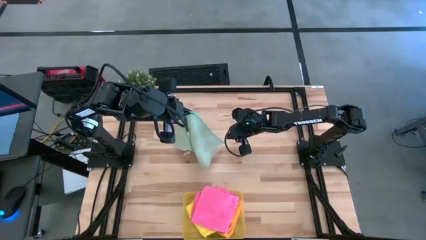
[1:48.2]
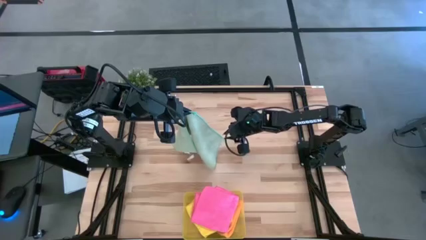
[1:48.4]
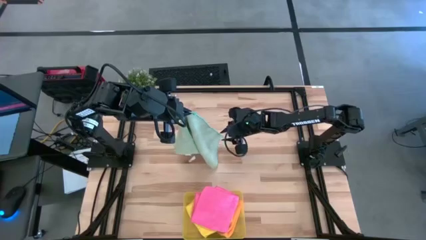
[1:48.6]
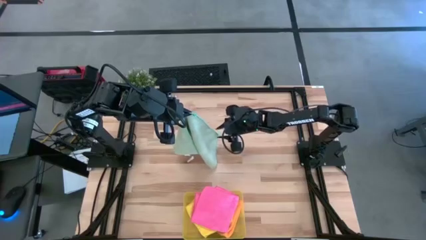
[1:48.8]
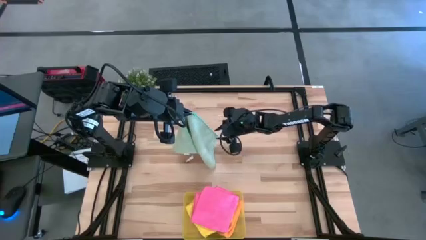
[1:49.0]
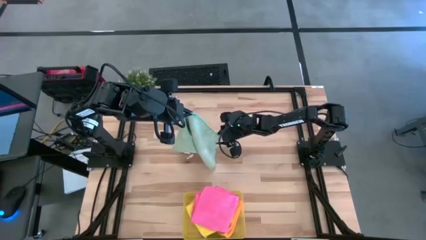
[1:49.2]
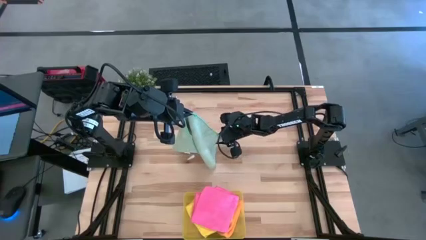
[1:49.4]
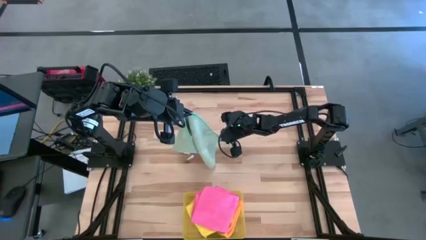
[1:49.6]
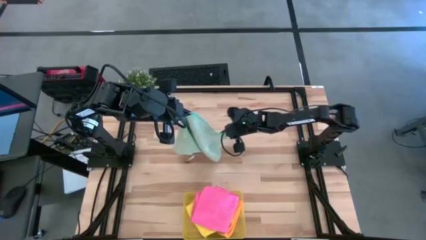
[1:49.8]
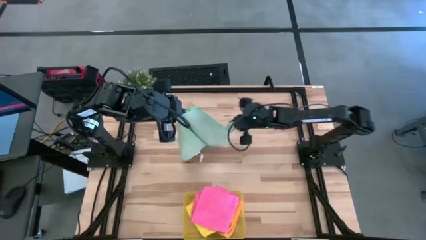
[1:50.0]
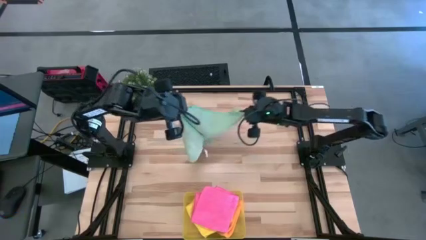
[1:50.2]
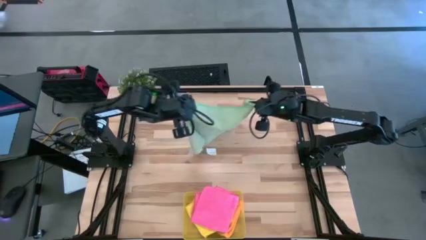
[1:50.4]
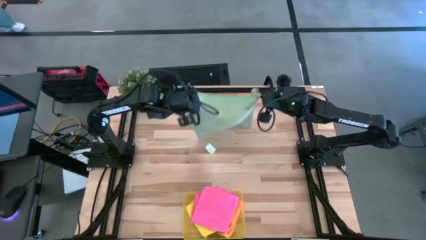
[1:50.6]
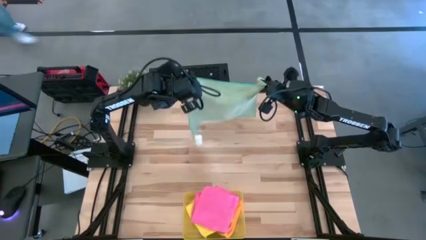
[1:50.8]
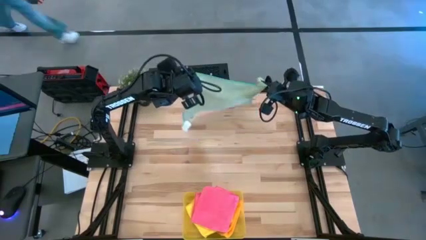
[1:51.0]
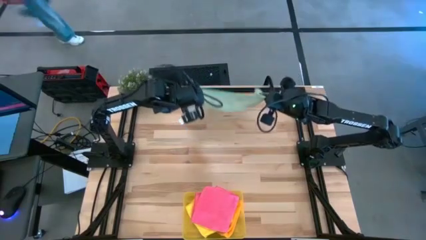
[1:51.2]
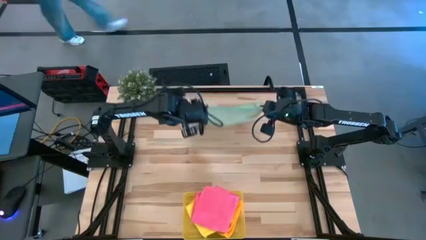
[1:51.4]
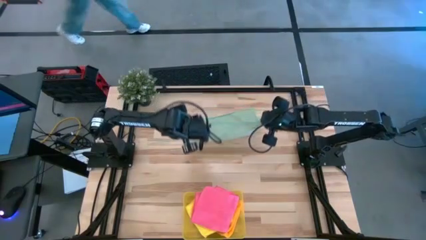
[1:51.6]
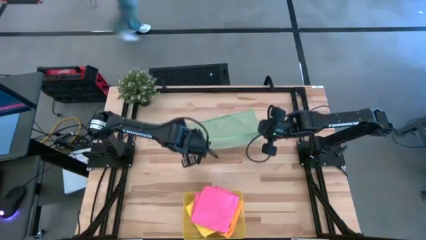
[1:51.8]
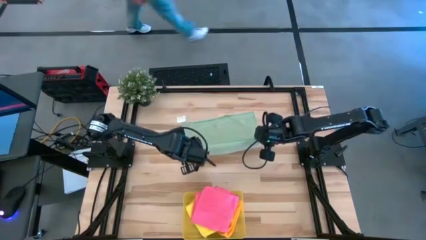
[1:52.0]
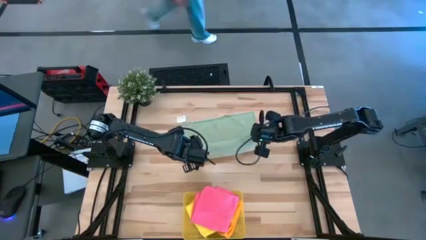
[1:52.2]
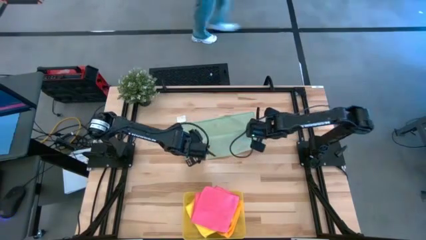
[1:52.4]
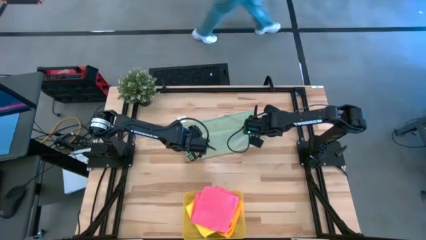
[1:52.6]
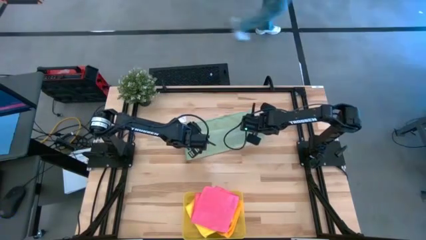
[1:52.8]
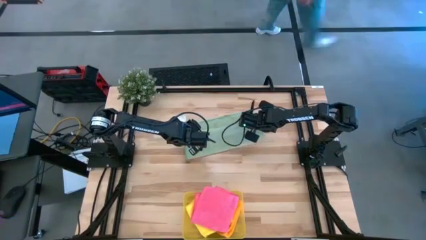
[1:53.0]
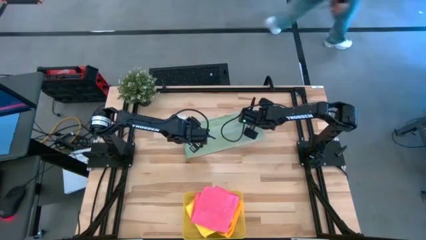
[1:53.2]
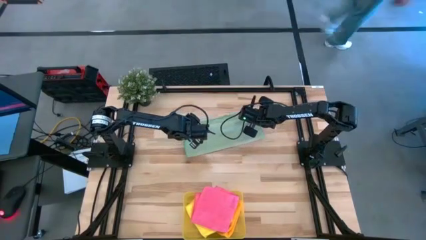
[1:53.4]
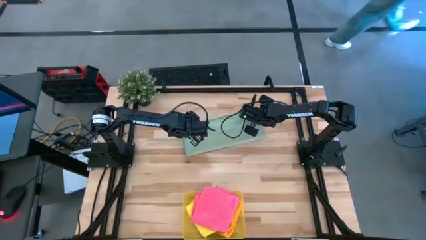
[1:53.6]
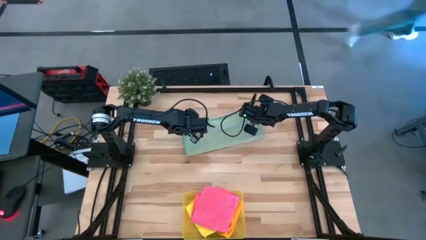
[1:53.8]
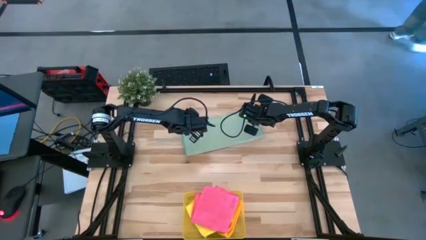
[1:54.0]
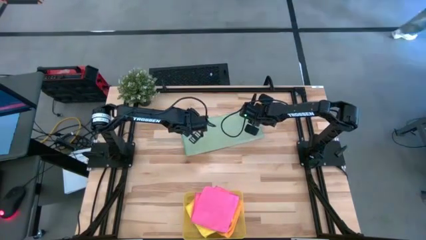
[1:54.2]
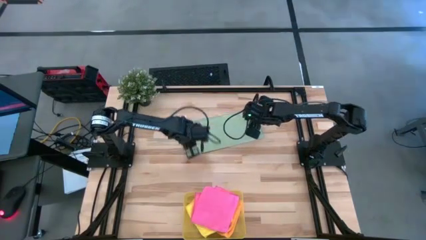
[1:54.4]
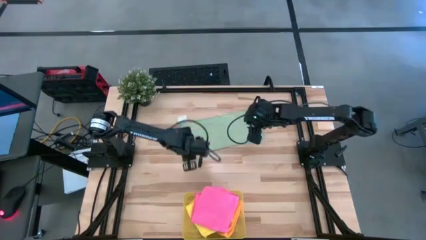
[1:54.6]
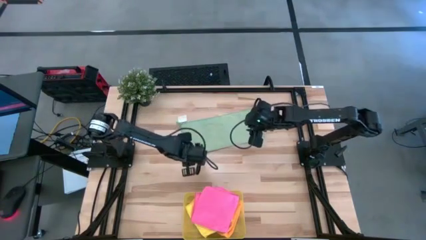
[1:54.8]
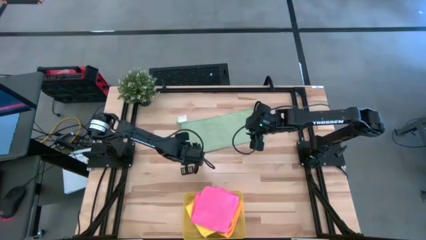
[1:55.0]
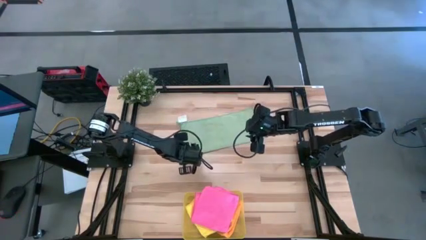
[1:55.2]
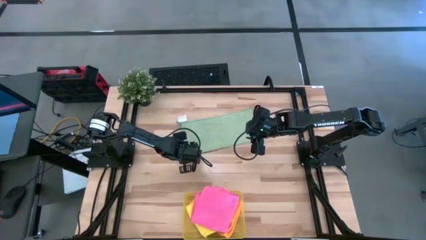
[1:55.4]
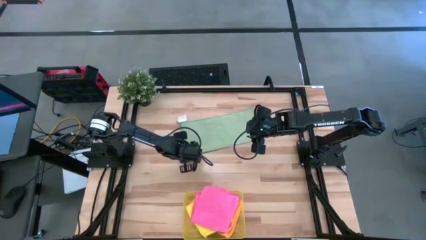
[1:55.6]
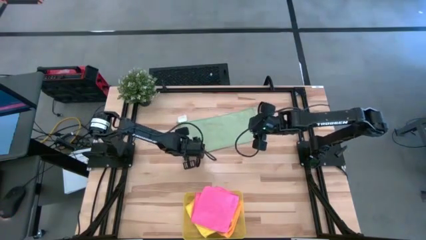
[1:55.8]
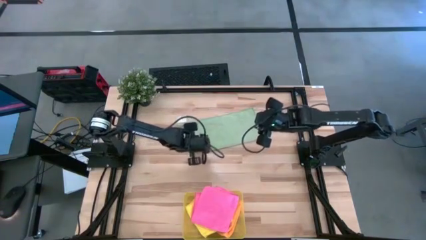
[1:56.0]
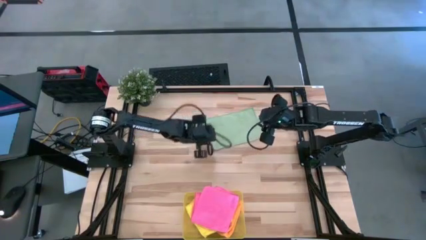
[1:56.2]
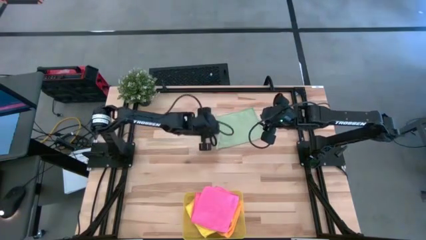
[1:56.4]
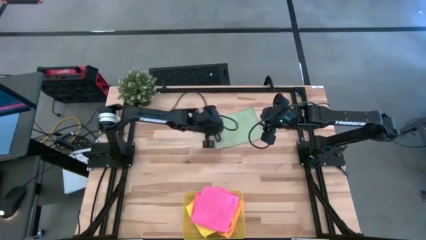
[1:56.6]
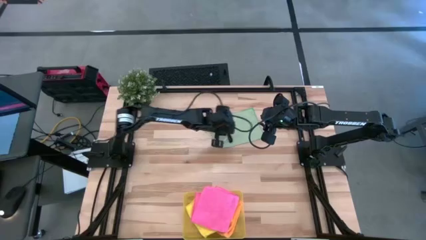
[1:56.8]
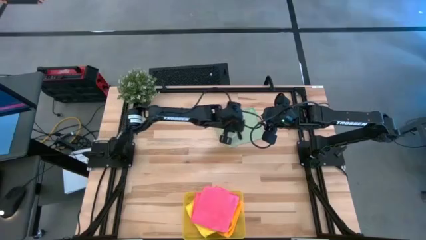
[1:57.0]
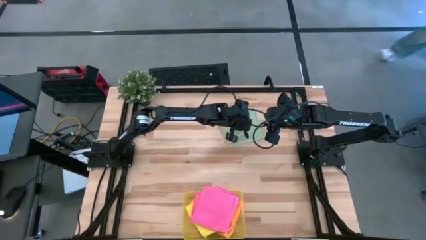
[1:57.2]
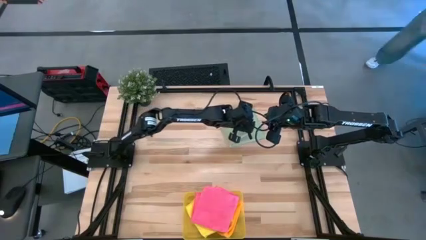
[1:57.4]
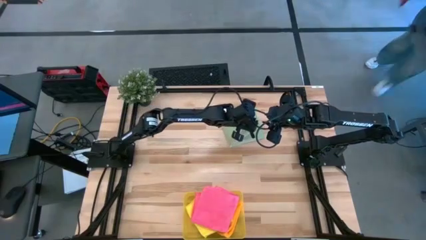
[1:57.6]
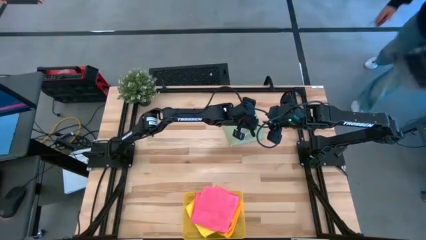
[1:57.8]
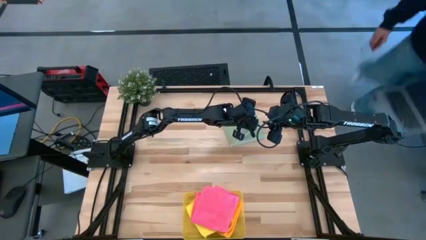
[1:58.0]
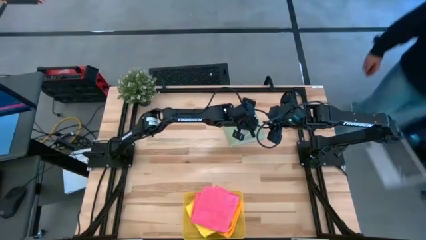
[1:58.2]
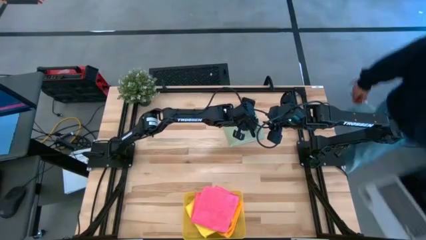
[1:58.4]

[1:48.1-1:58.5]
Task: Fold microfiber towels
Fold the green microfiber cloth

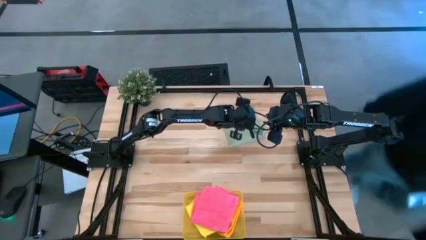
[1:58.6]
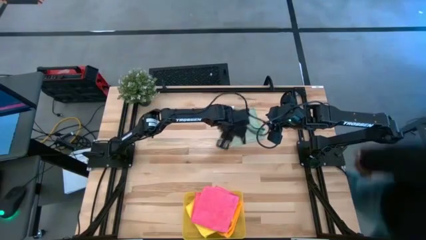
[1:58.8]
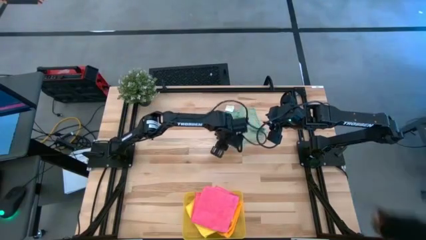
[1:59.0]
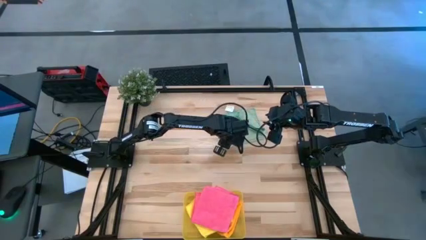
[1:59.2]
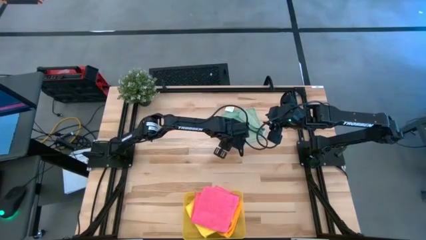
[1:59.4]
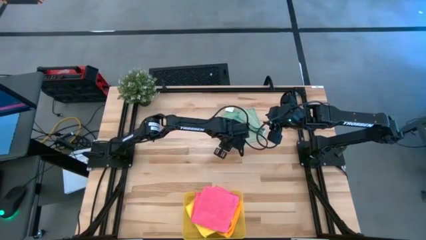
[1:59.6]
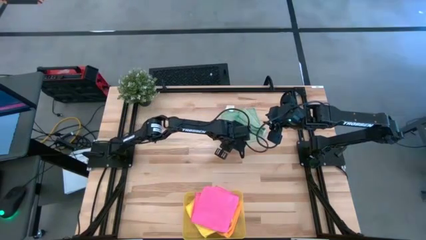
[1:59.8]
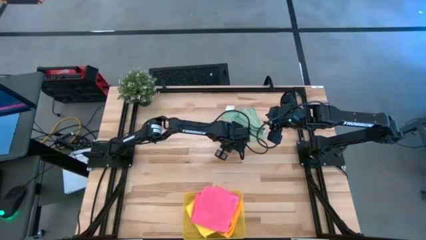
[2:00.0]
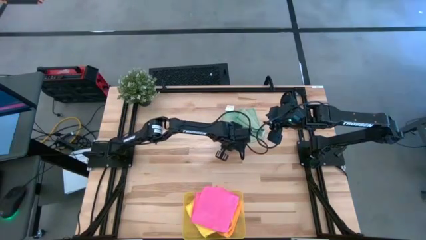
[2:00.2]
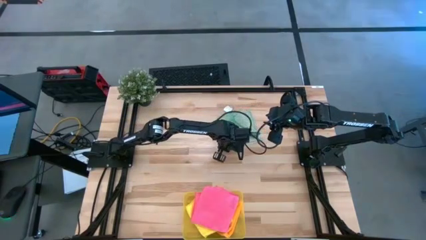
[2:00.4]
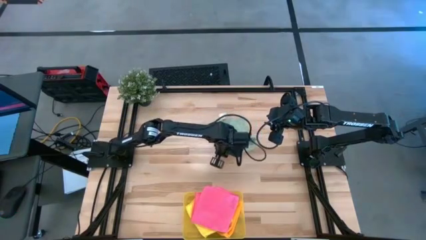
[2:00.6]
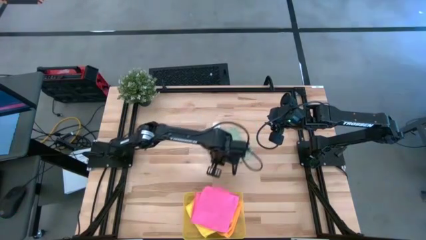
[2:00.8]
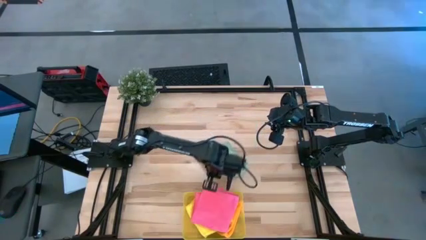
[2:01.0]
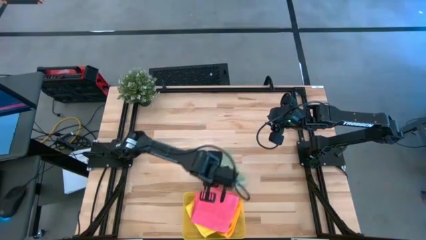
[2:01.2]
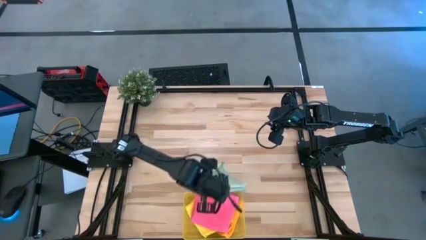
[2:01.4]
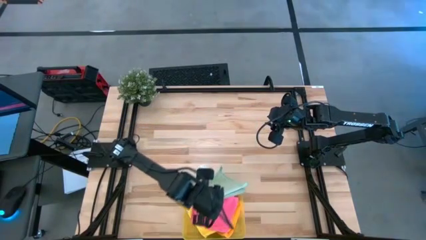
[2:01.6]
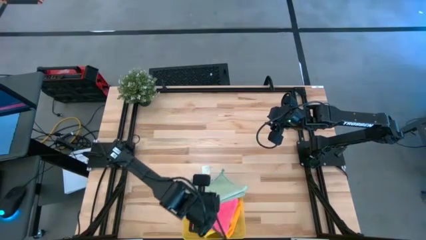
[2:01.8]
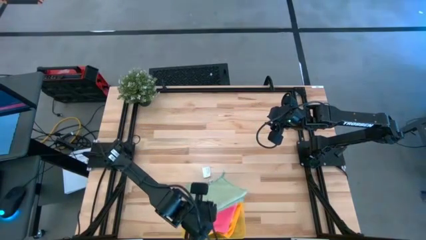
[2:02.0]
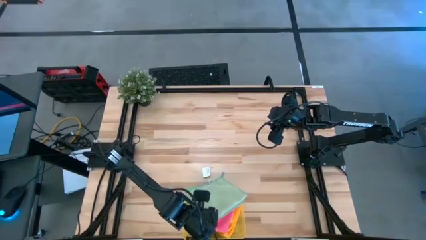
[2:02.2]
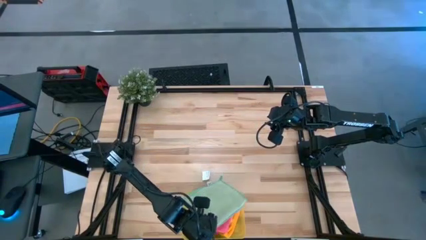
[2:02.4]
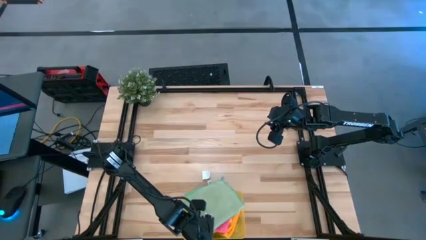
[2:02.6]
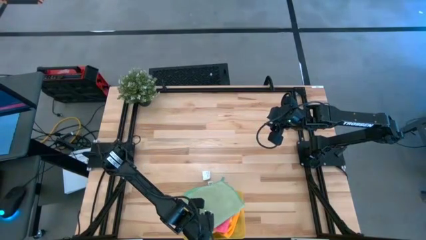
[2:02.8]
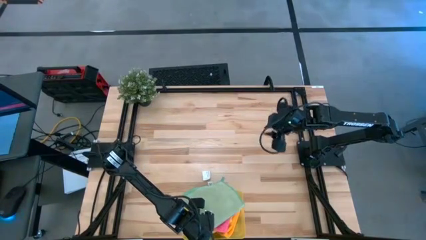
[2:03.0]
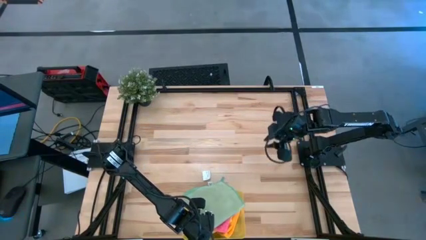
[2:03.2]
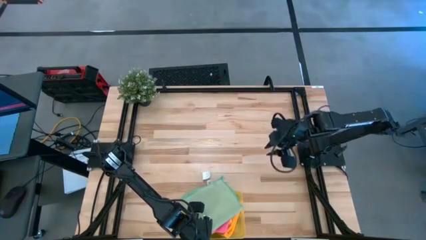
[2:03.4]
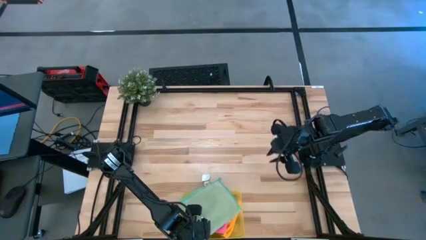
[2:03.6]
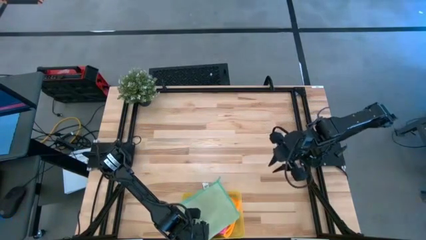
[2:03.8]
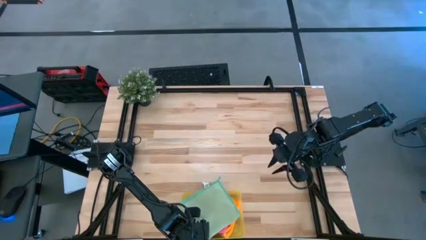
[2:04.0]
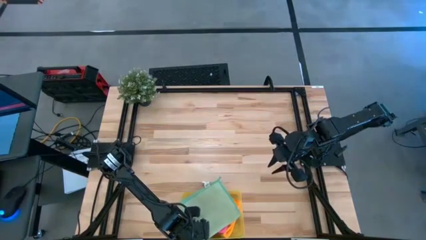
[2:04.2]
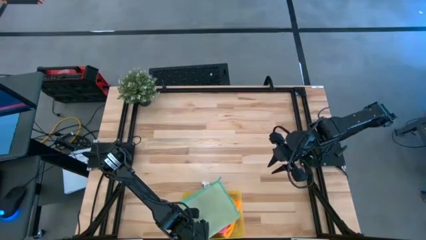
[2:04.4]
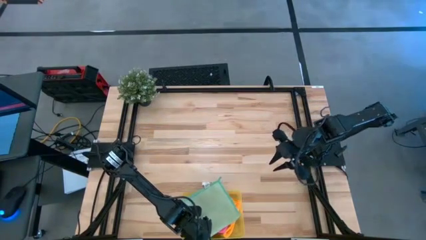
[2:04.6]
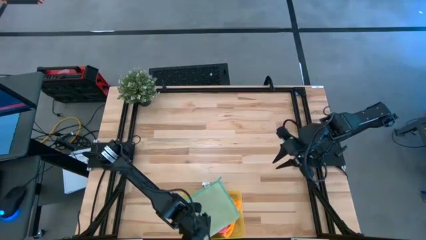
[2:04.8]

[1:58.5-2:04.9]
Put the green microfiber cloth into the yellow bin
